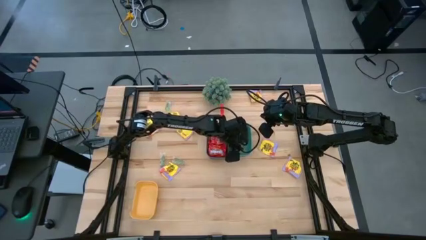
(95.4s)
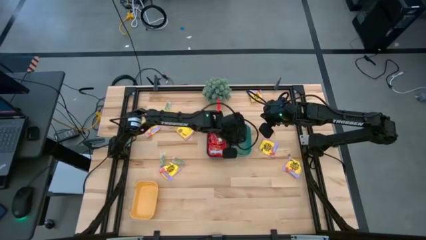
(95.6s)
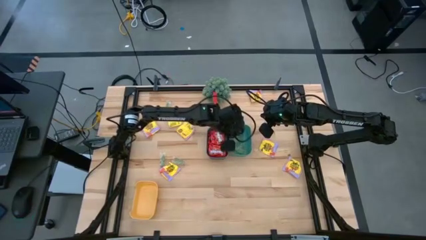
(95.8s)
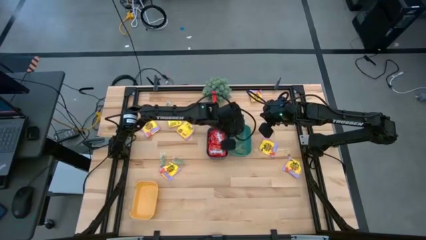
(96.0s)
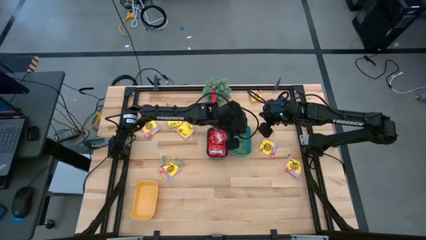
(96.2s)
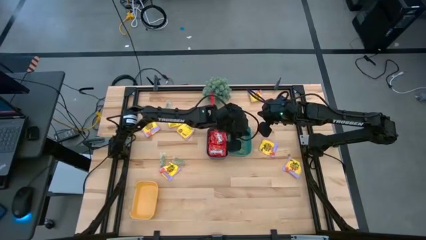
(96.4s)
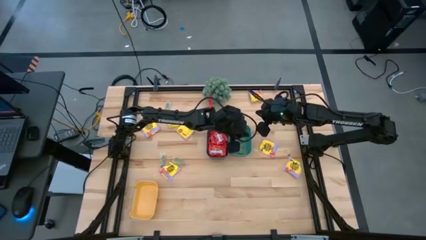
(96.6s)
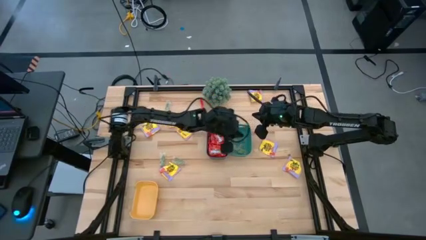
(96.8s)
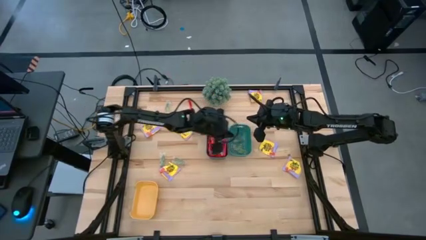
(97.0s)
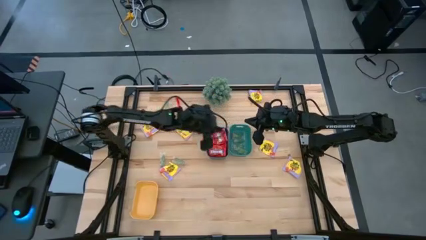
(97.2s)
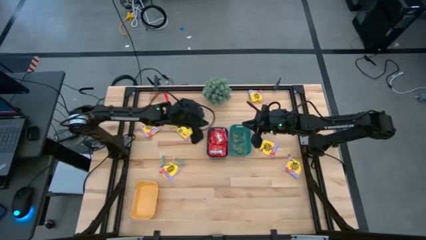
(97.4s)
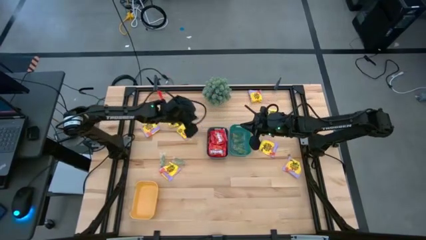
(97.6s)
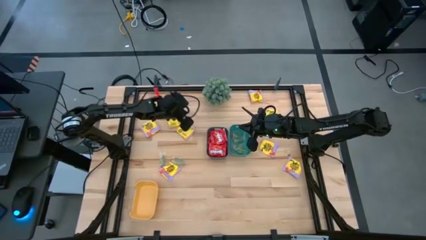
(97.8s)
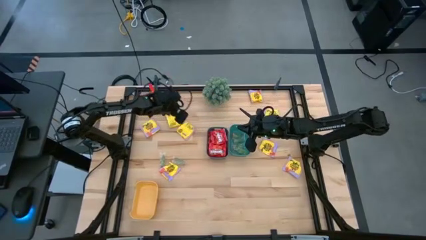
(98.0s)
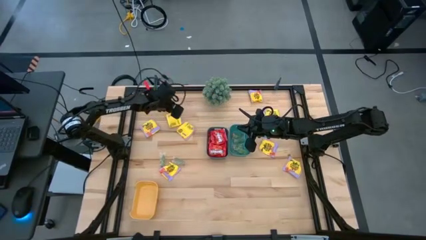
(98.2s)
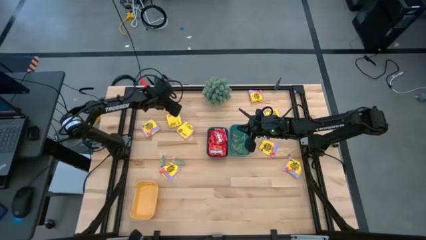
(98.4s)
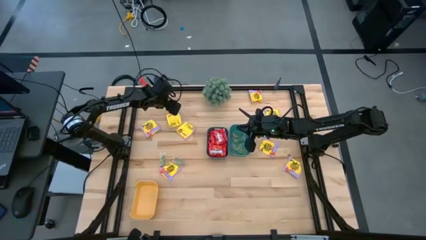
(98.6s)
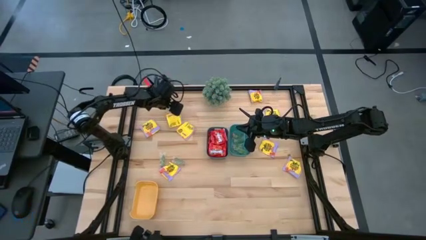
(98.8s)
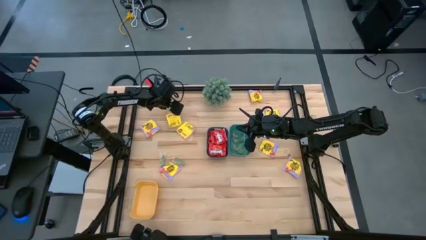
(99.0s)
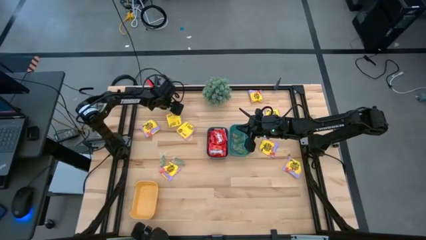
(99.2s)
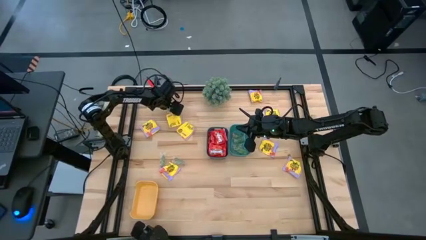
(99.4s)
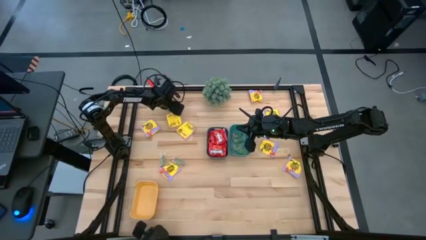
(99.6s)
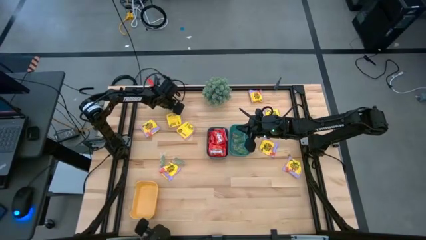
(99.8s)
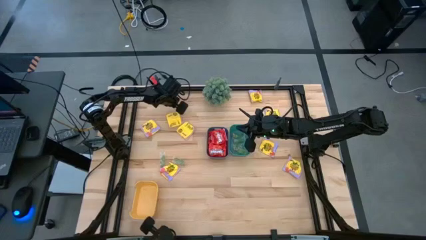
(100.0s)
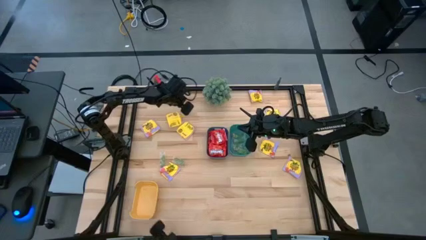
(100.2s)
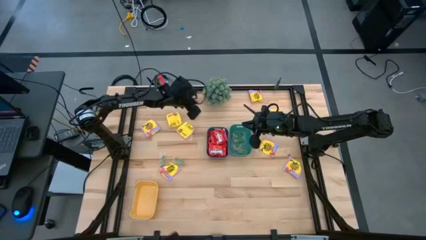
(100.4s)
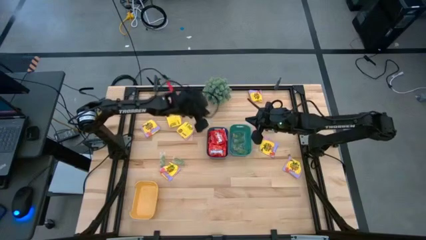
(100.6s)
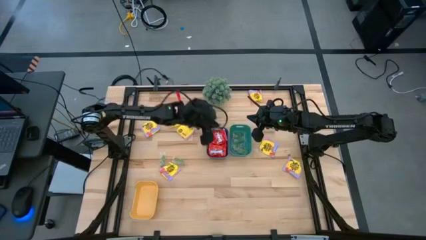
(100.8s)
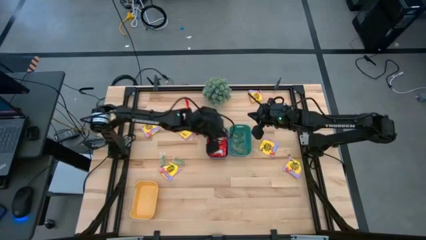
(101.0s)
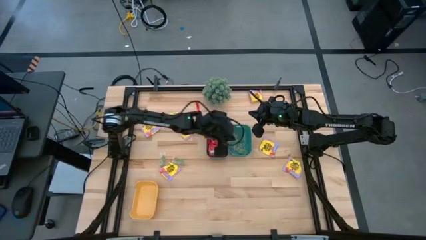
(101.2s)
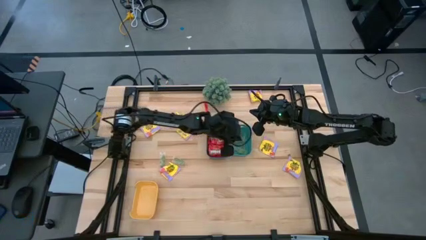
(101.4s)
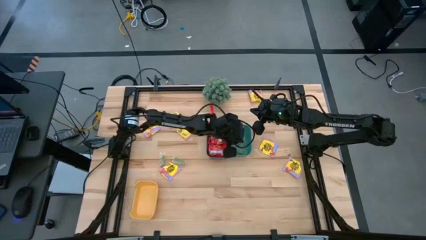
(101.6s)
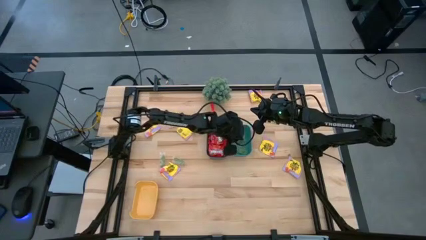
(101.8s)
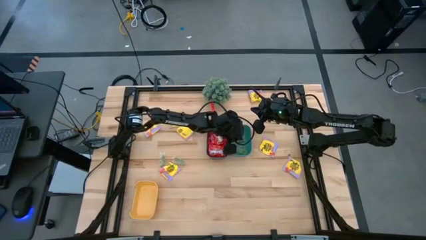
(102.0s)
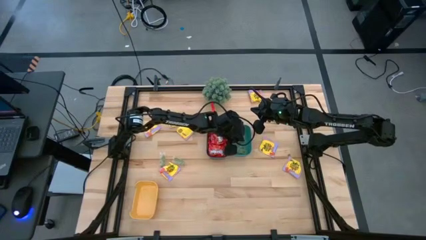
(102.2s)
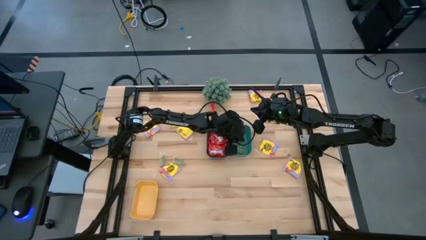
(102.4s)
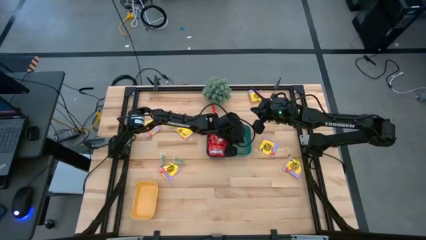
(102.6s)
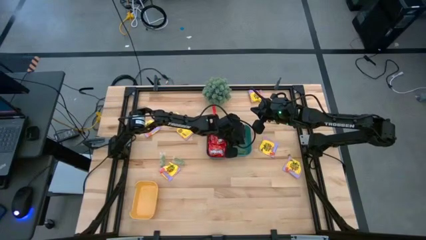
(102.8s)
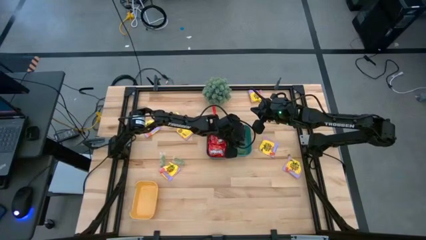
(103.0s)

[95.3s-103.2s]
Task: Sort candy
Put the green gummy into the green bin

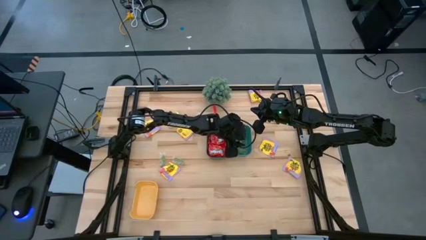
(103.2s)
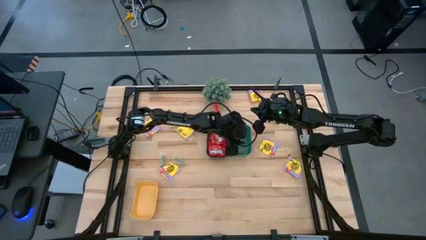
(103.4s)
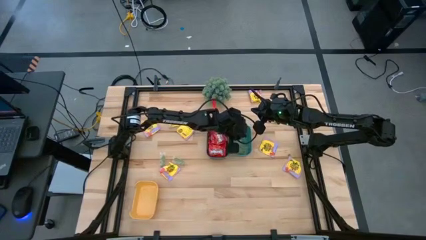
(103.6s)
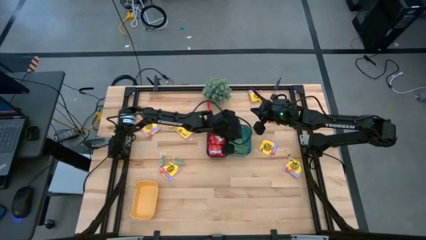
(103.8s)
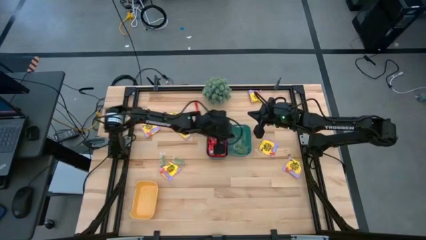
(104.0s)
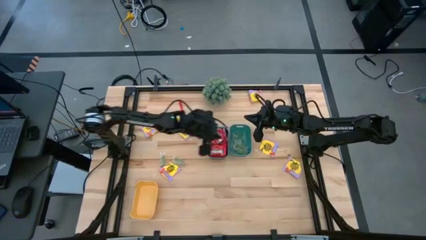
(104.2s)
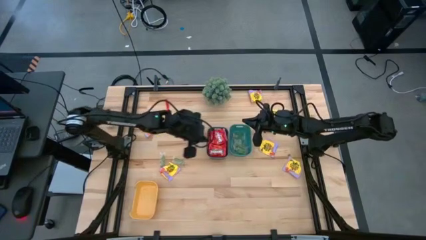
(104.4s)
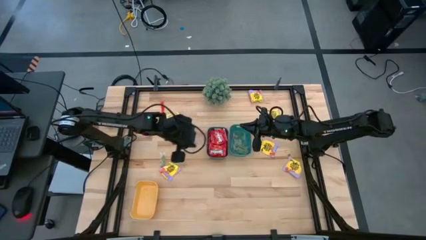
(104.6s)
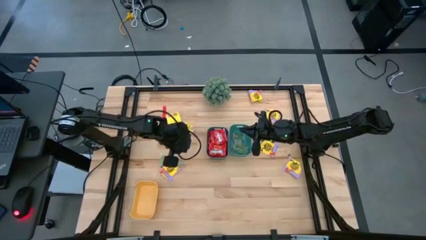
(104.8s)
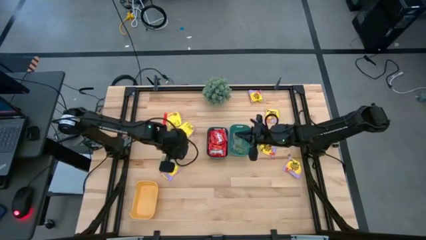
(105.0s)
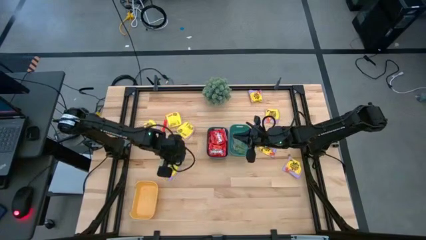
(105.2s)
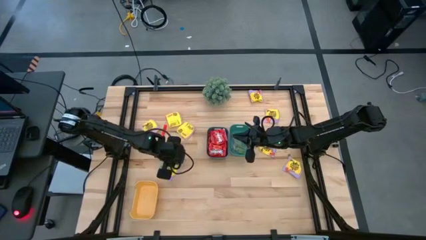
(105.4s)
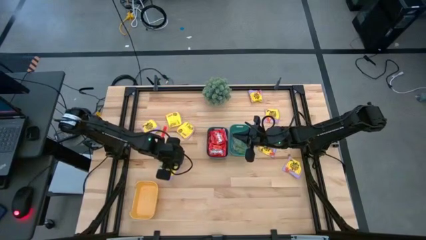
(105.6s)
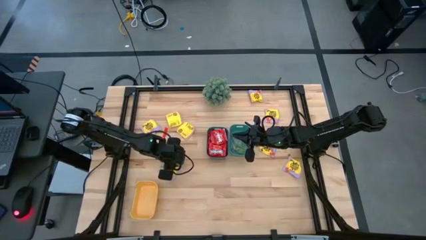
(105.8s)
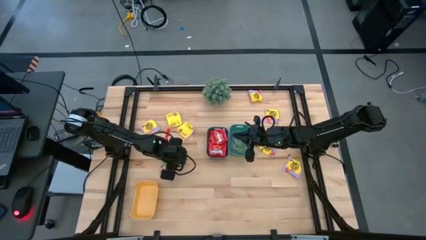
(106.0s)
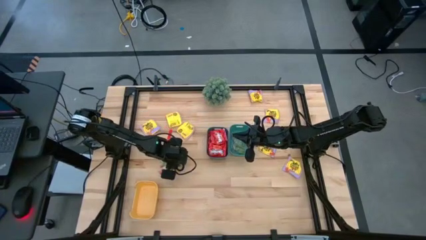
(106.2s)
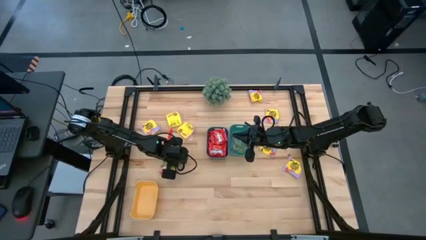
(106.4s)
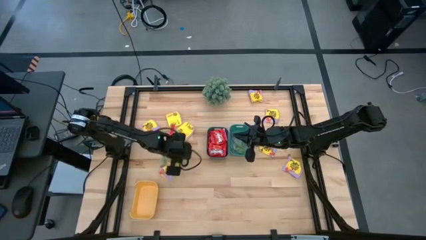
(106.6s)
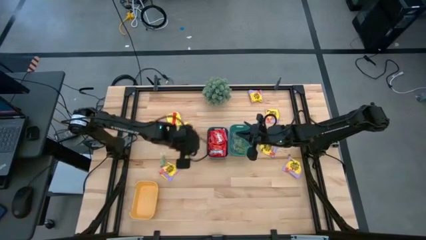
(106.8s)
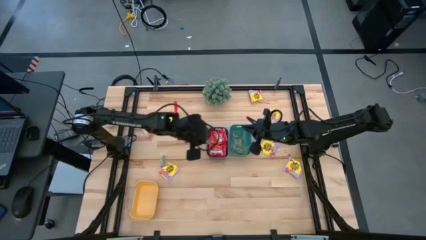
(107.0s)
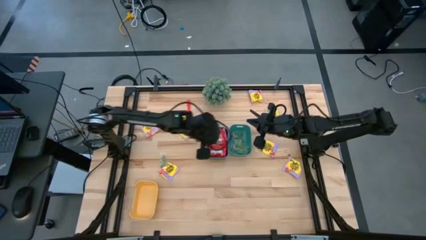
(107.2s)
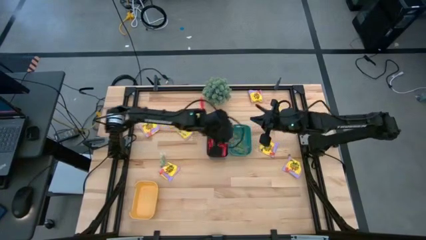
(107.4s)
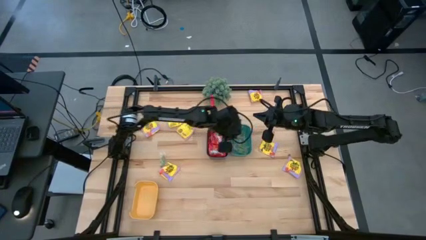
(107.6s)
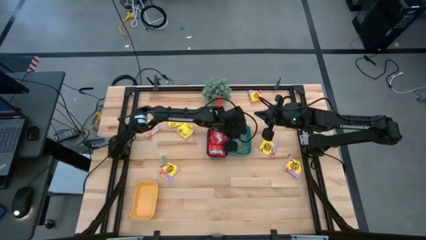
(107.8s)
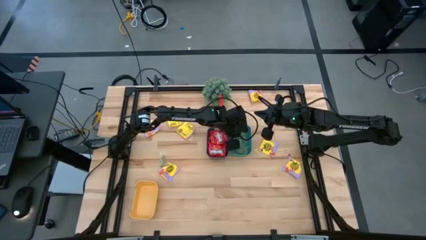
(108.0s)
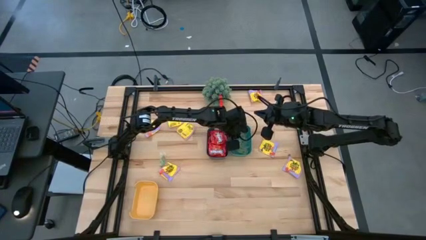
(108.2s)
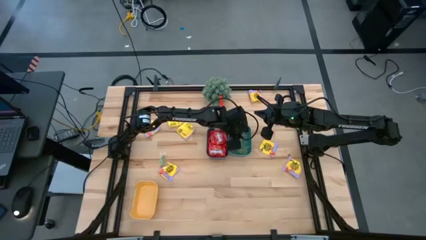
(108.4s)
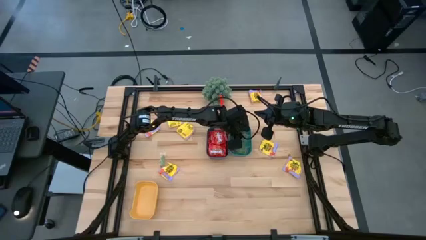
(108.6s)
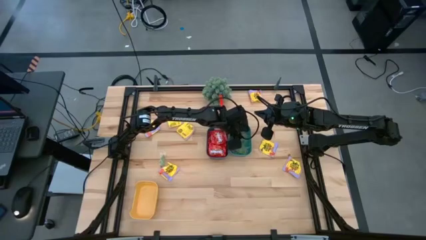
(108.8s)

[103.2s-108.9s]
Put the green gummy into the green bin

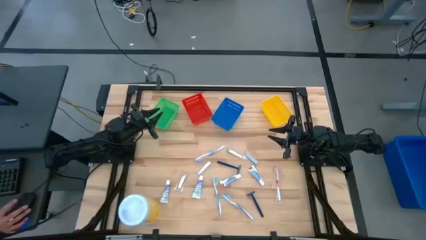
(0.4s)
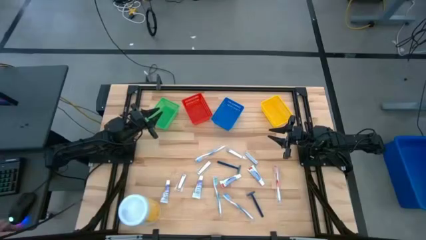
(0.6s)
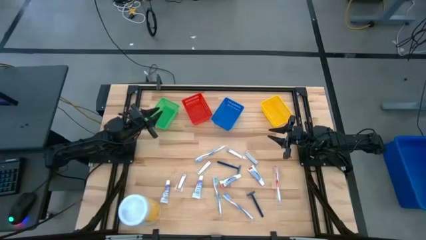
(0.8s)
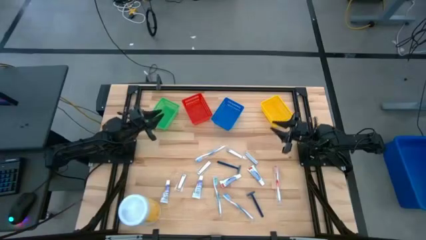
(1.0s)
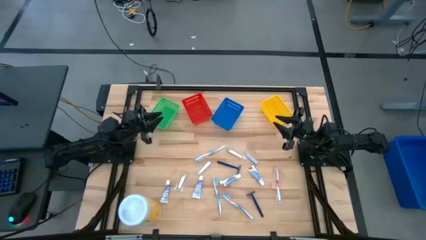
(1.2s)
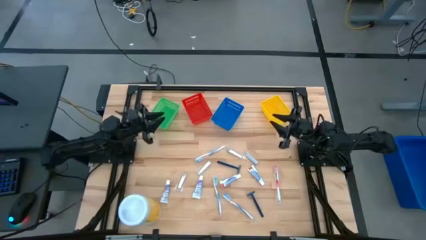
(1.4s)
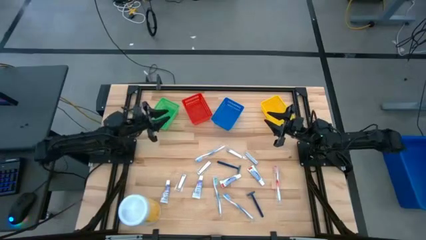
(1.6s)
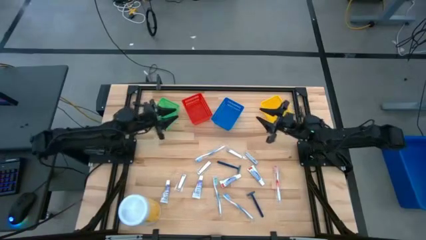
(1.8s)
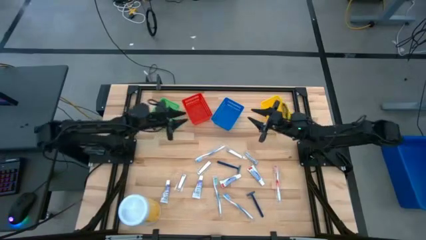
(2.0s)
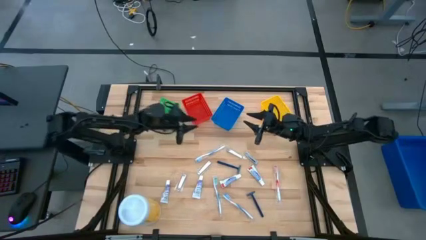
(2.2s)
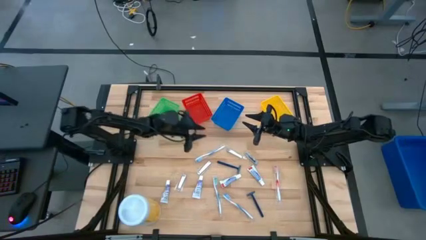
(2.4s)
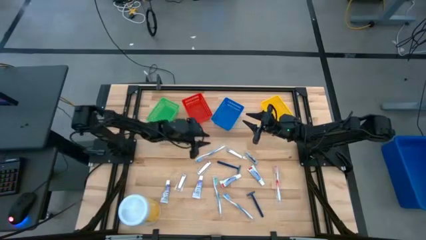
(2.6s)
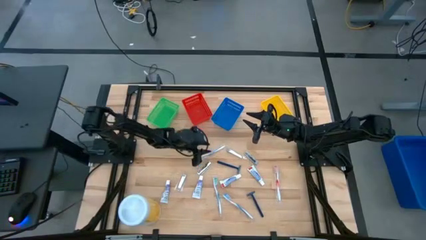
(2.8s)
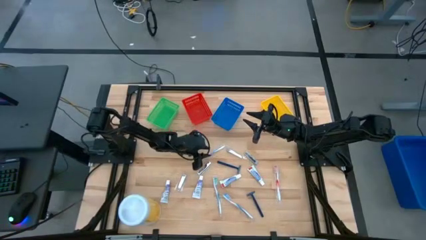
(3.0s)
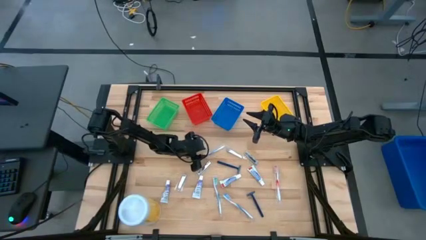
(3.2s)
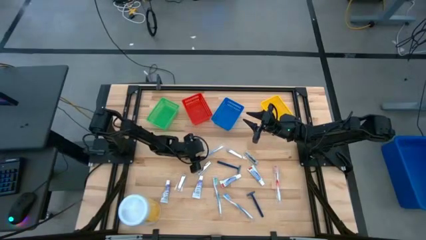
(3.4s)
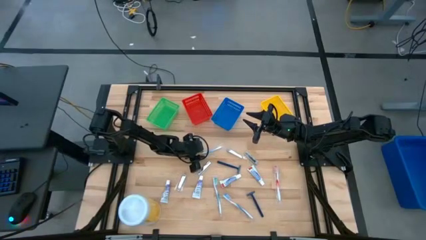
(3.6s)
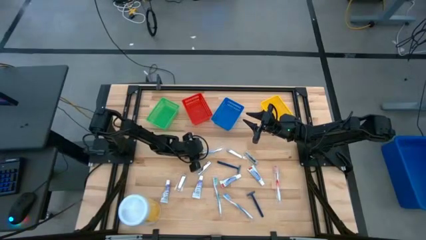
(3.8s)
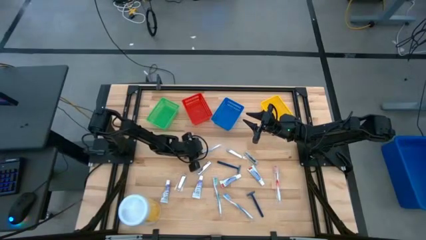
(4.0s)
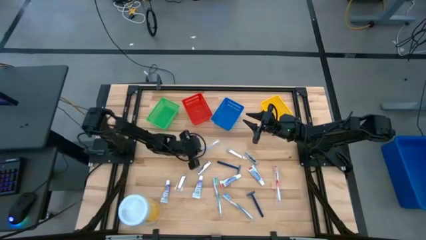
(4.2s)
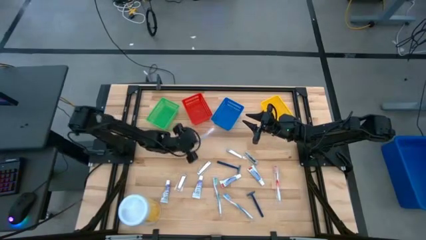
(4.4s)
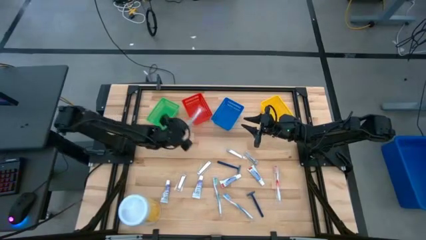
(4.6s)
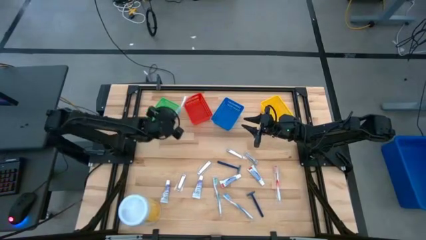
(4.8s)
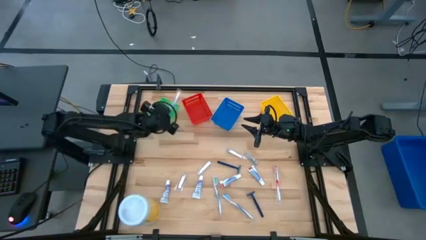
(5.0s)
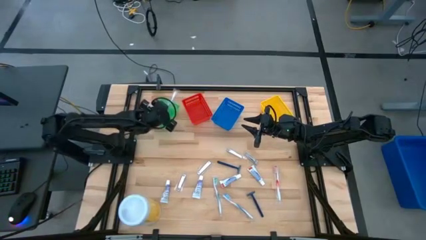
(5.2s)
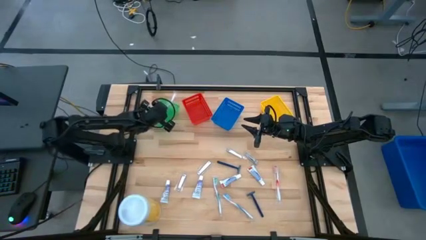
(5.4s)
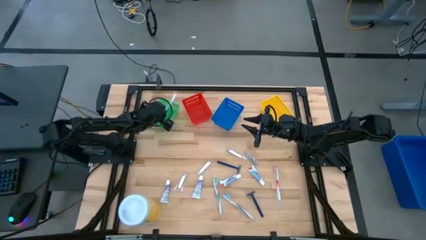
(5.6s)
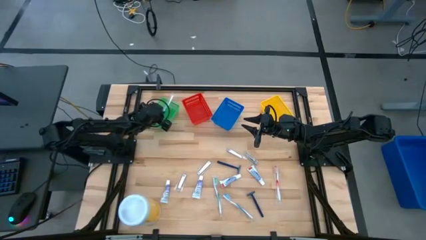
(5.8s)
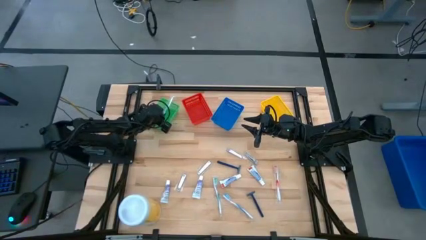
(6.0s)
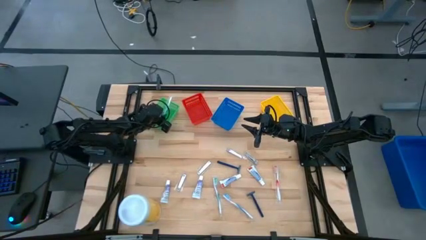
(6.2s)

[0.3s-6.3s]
Task: Pick & Place Travel size toiletries
Put the top blue toothbrush into the green basket
